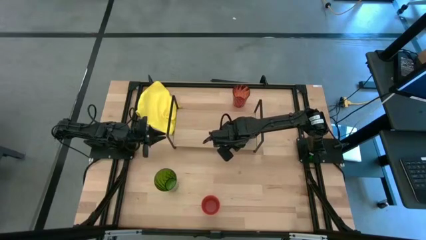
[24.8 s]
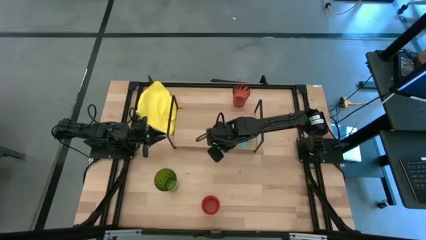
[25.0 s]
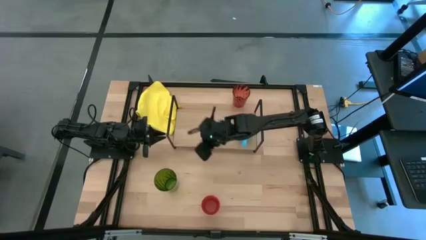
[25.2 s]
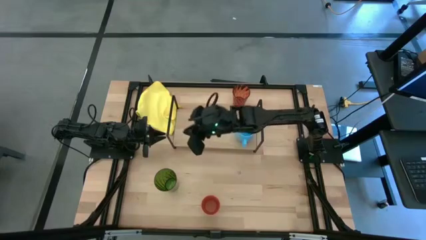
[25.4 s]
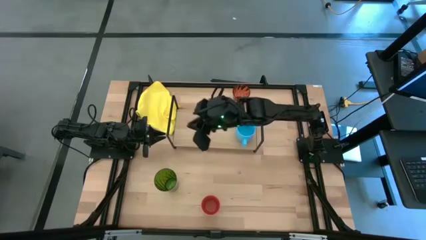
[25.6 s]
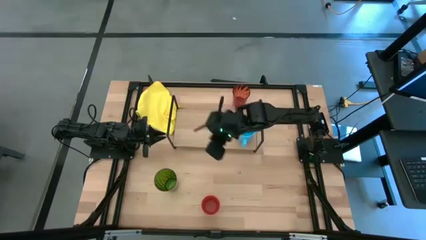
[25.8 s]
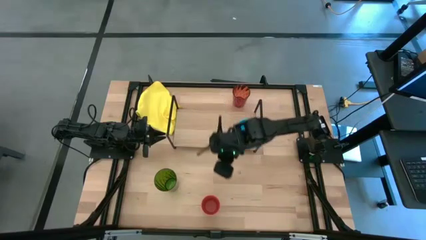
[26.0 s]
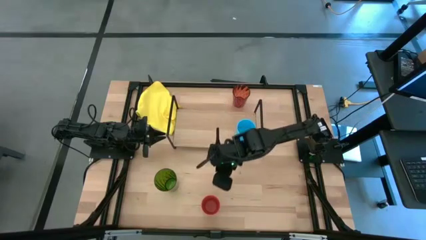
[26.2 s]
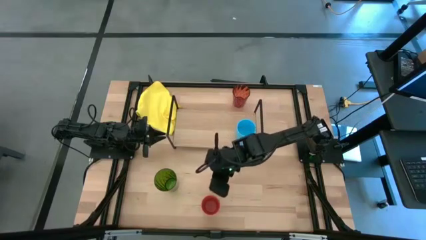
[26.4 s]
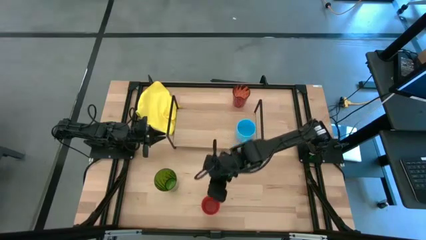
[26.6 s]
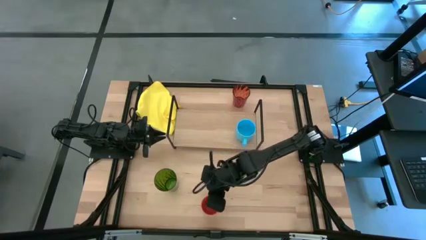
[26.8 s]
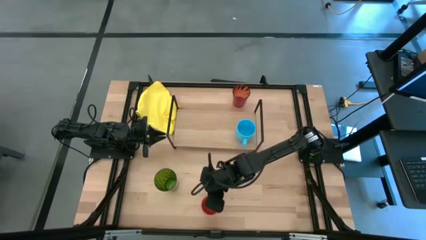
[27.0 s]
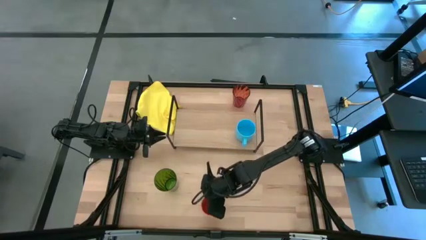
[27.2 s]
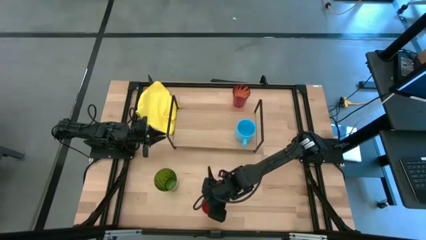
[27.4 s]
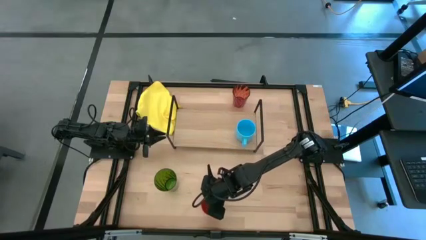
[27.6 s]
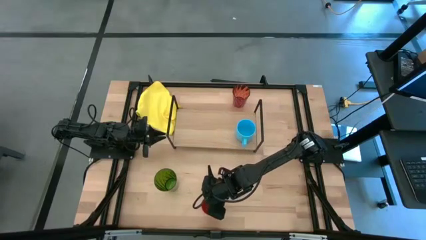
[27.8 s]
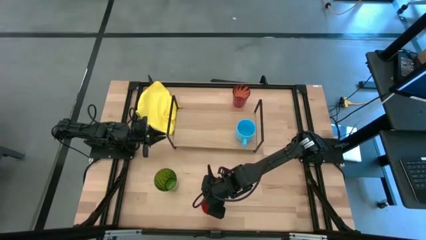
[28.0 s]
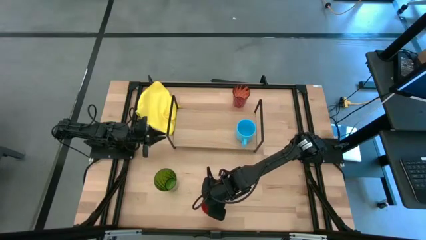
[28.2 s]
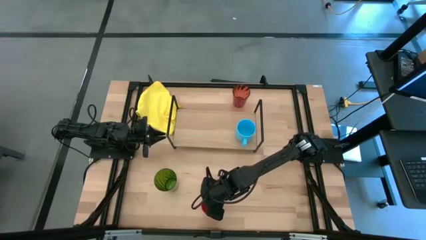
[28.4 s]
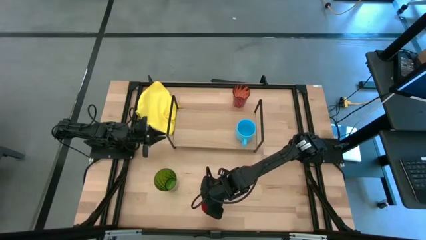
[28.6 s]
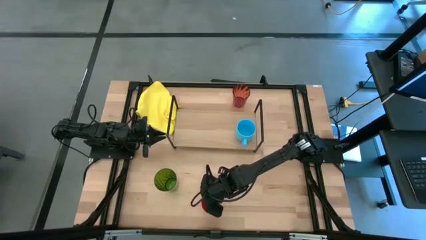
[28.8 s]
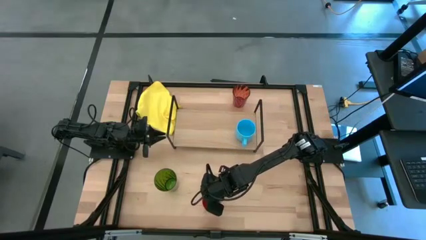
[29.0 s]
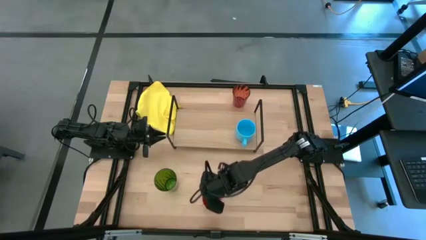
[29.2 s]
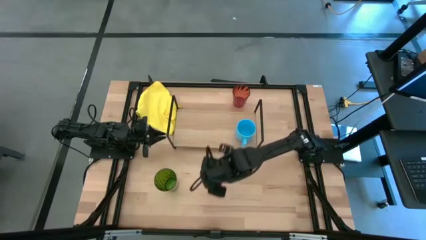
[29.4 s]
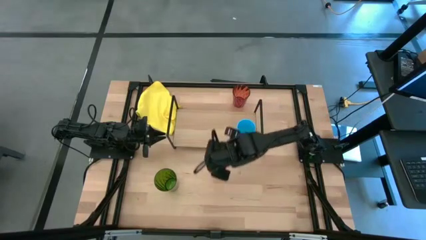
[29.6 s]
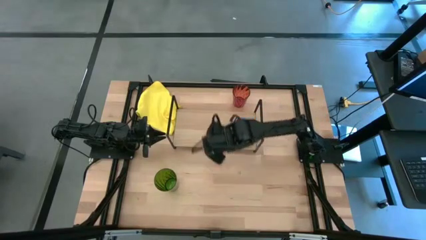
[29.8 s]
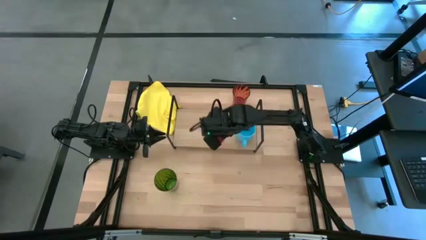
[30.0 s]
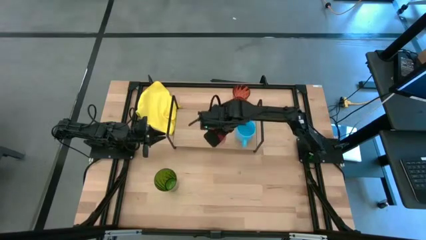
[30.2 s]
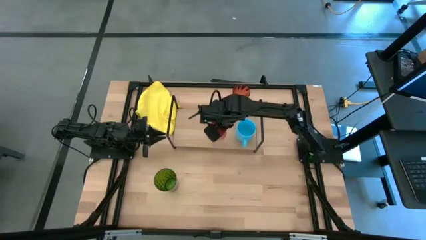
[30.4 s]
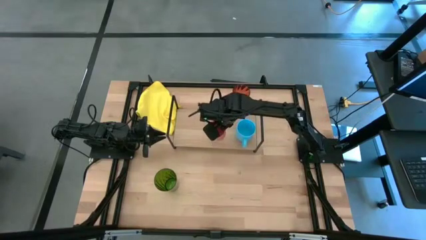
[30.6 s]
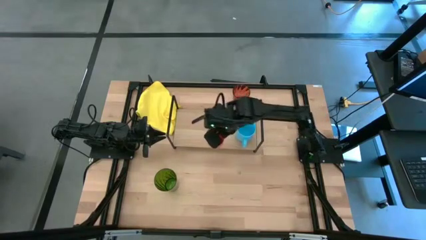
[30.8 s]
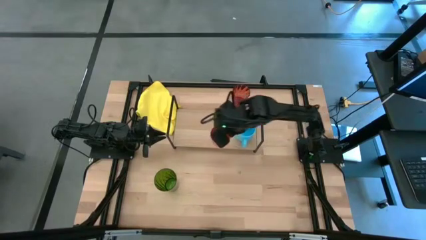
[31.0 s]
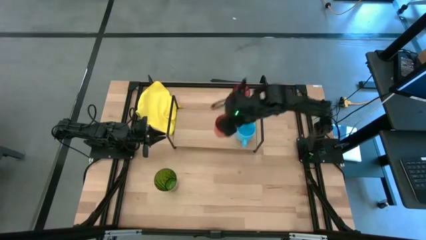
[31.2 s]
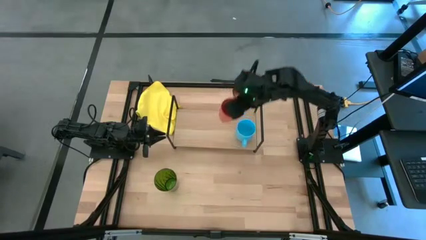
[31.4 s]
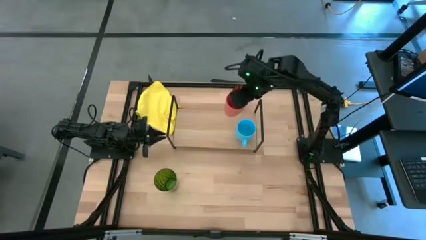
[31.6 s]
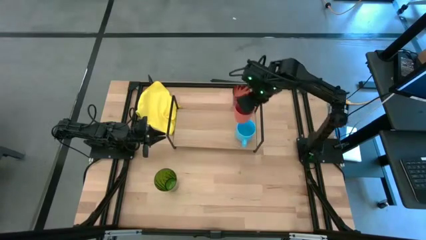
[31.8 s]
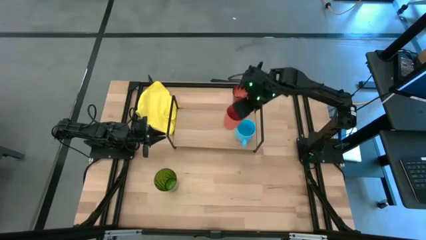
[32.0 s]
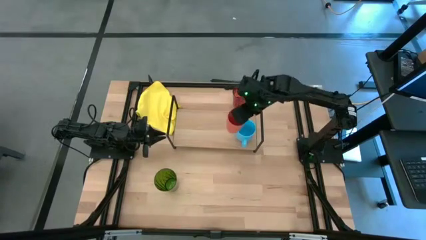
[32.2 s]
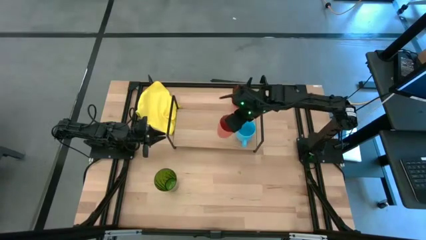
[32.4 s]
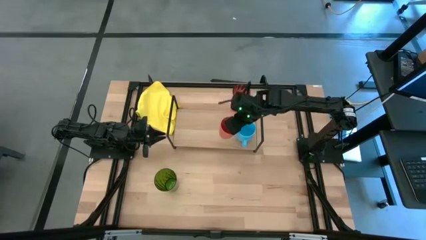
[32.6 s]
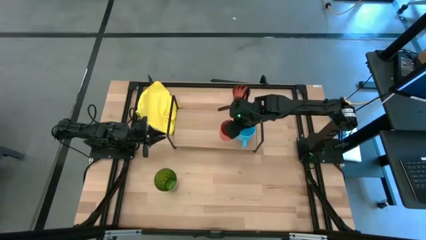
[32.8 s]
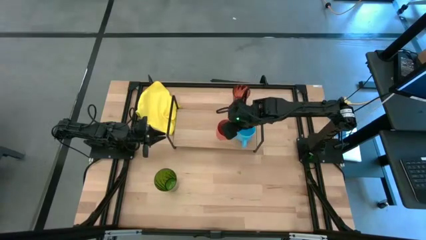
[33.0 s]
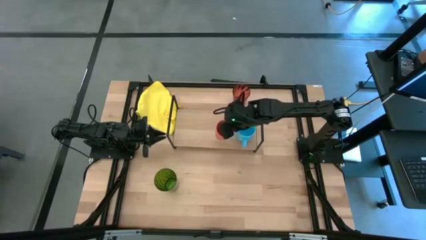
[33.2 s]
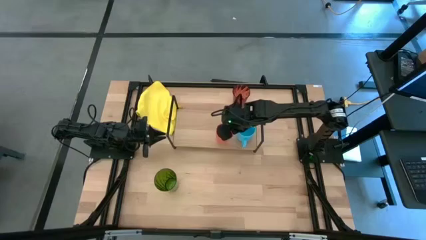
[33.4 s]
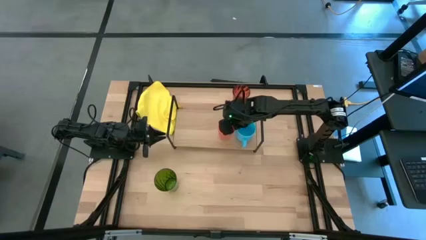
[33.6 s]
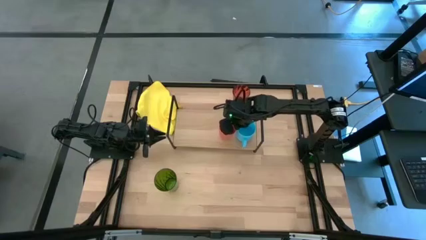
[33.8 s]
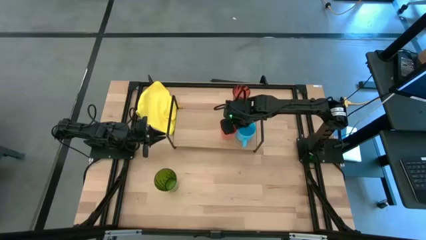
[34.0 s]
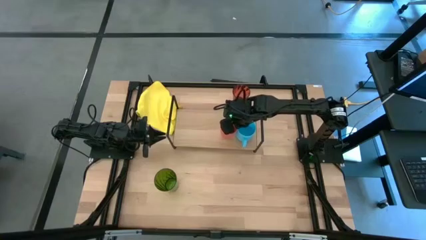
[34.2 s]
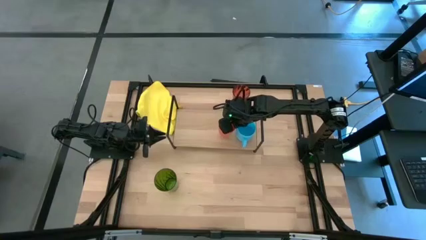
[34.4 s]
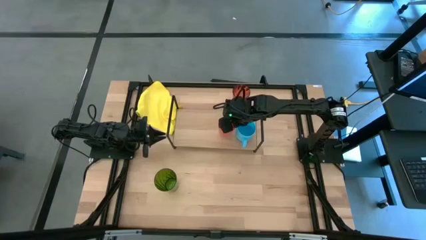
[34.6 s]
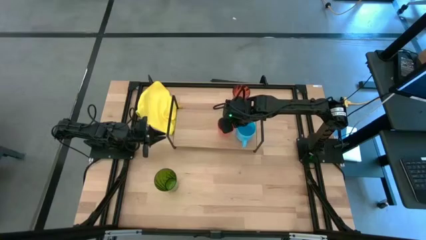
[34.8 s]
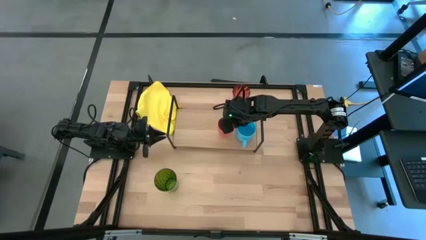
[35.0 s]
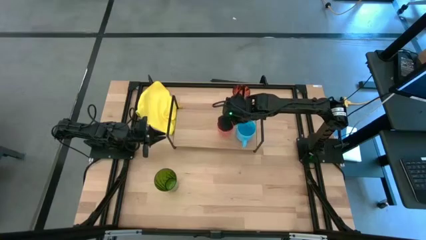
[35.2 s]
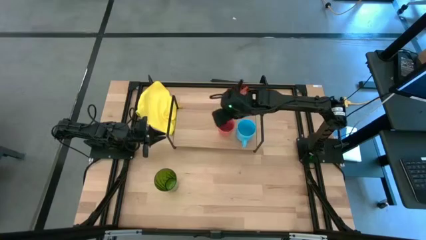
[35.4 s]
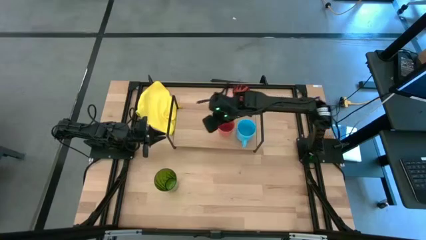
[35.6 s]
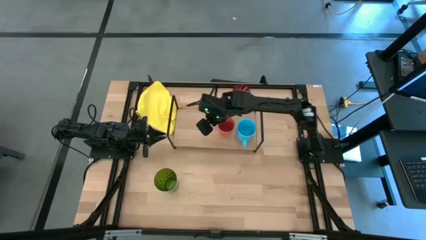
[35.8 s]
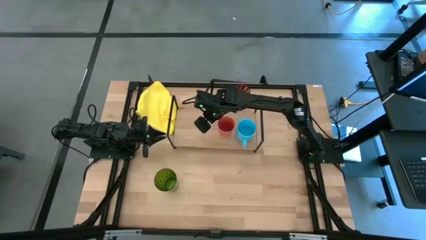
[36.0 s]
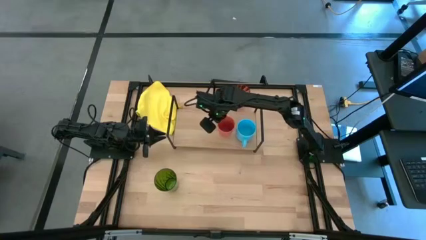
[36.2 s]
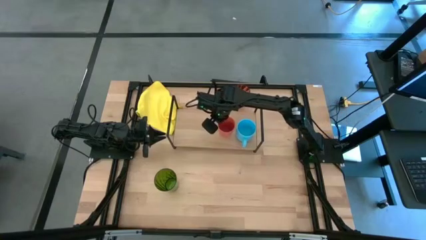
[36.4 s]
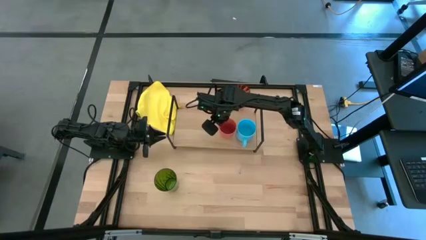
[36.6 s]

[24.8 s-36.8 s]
Task: Stack small to large cups/mugs on shelf
Put the orange cup on the shelf

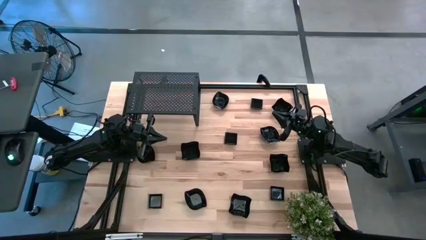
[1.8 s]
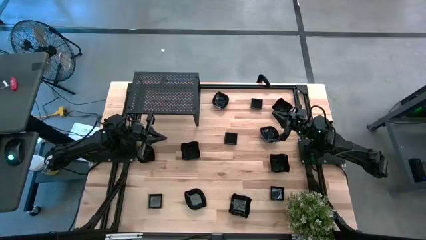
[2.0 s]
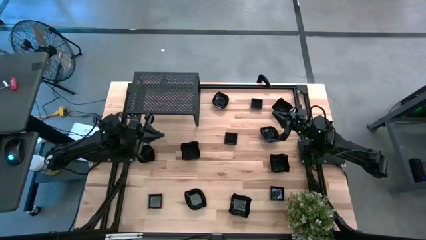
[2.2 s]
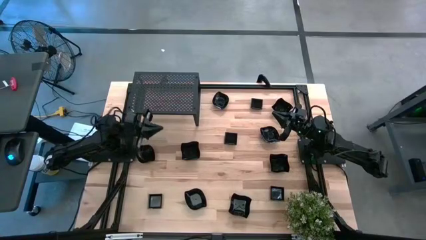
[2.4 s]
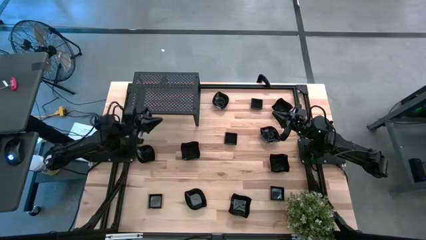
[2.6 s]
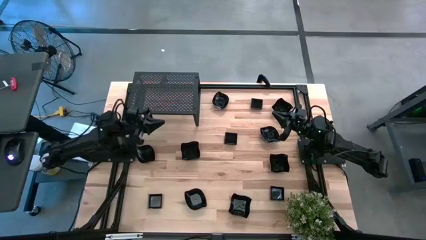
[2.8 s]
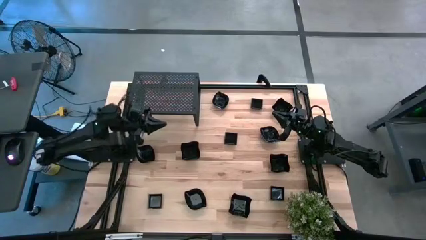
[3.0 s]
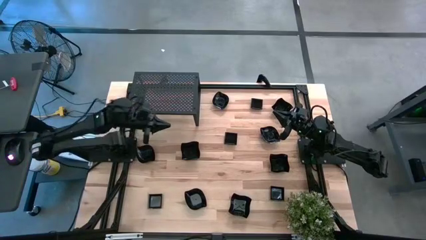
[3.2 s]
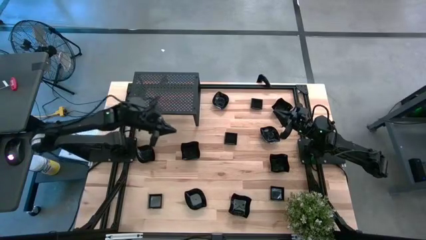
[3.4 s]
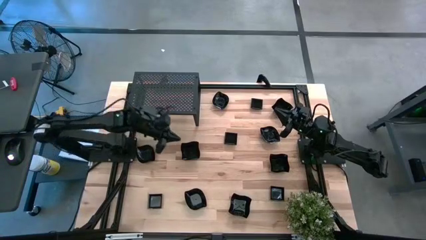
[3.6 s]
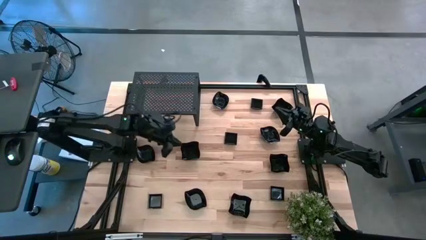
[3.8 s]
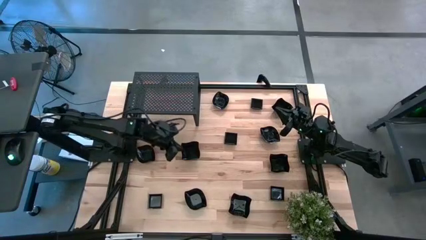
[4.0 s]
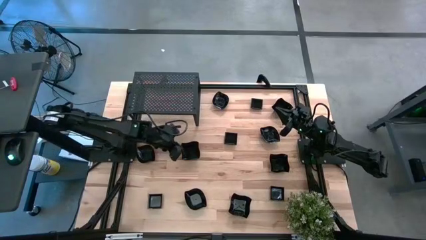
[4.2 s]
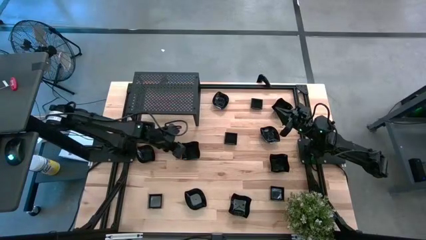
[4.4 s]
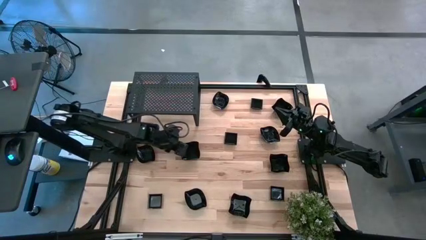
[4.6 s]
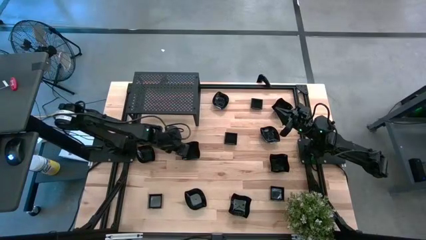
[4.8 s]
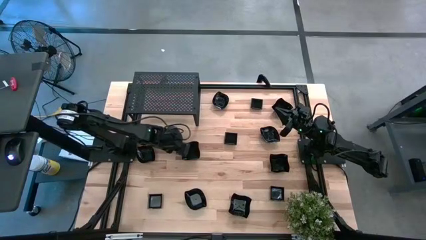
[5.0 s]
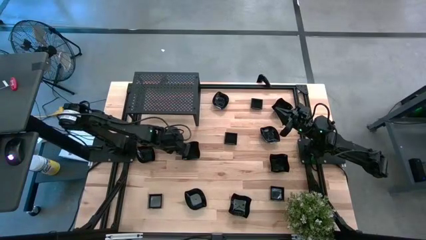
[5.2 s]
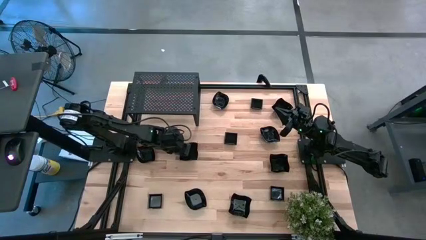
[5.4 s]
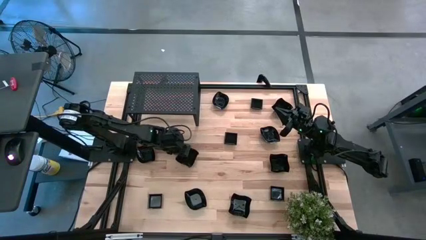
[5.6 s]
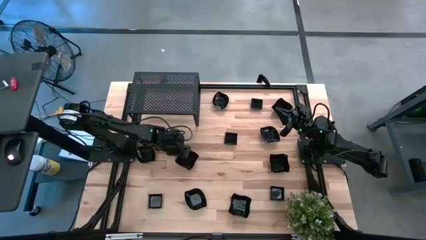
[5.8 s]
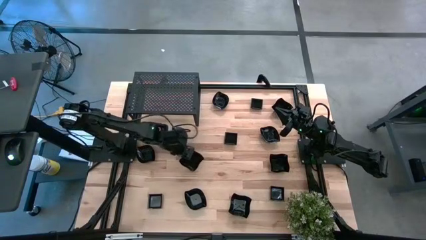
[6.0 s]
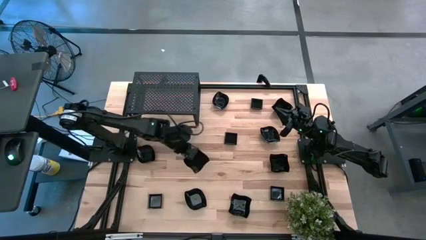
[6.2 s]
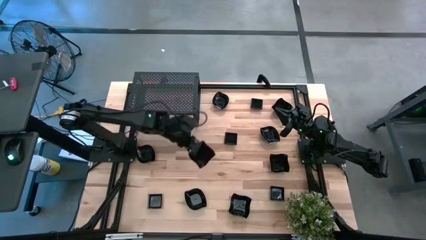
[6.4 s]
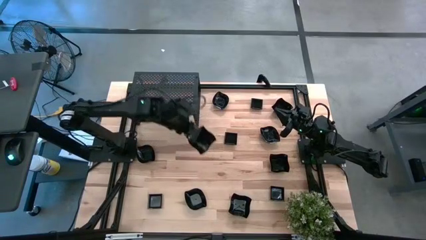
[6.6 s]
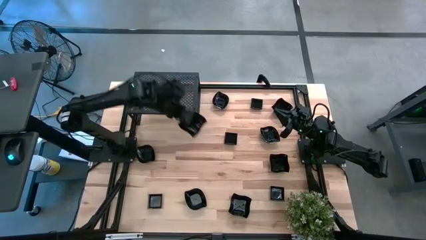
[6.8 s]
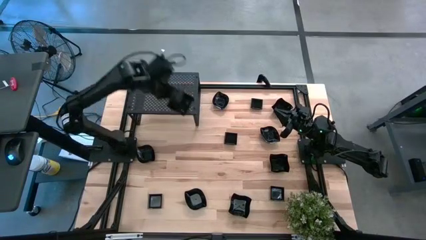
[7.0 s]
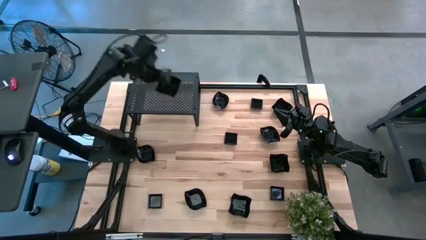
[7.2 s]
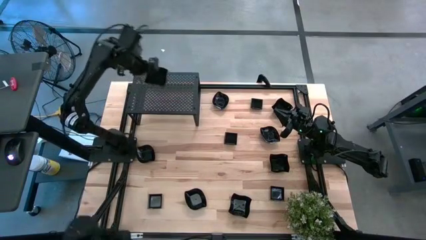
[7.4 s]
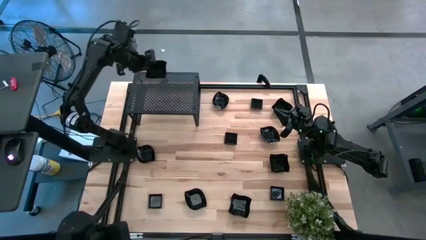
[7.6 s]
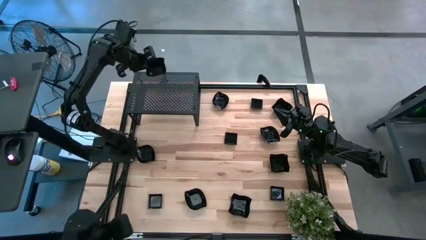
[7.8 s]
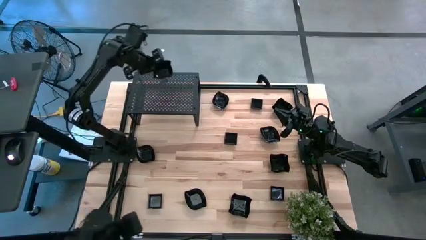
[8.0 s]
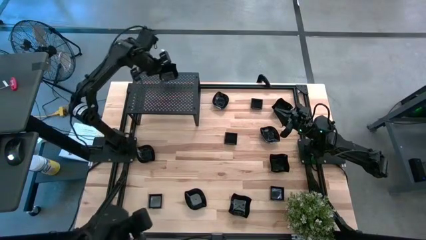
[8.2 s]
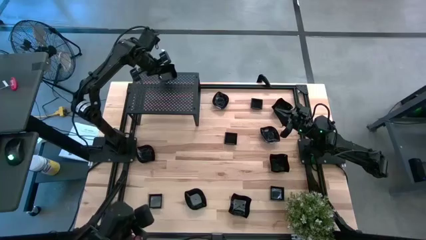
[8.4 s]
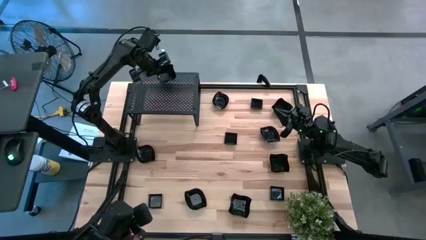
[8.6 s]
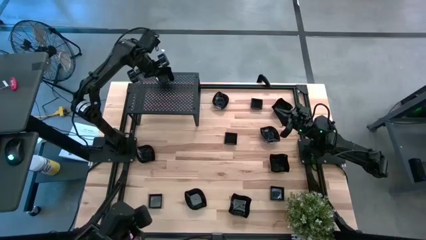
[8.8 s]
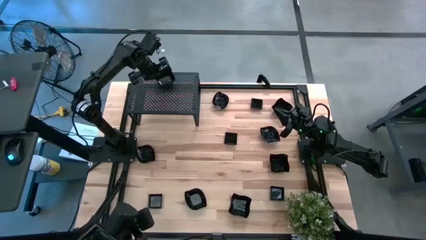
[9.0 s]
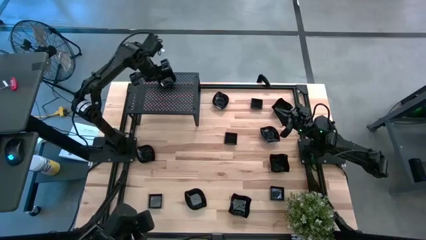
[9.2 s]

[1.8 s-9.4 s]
Task: Pick & Place Mini shaped plates
Put the black distorted square plate on the shelf
